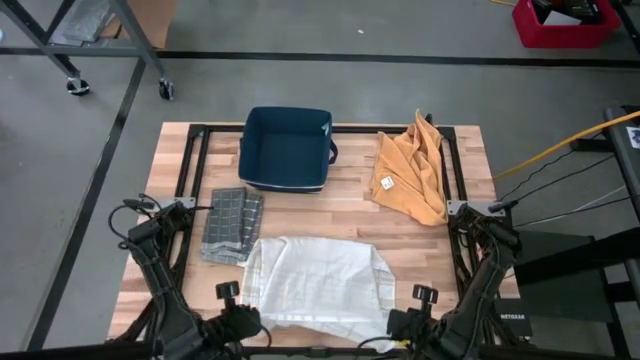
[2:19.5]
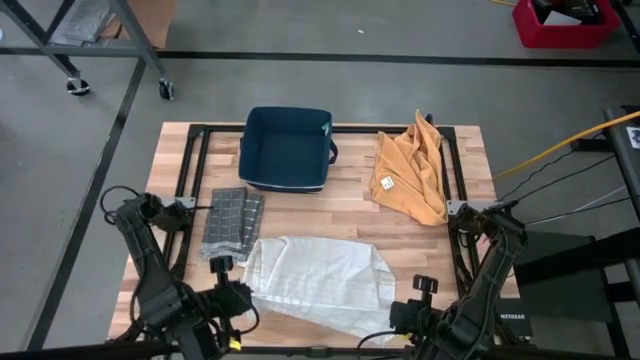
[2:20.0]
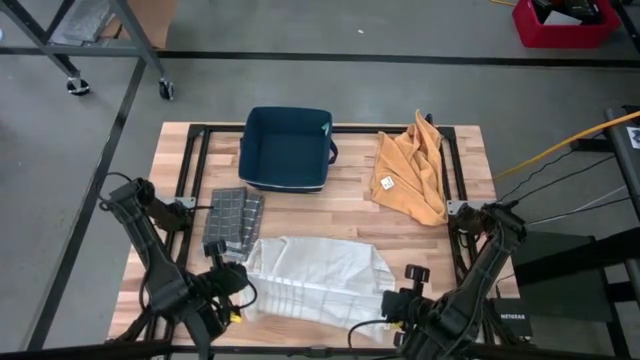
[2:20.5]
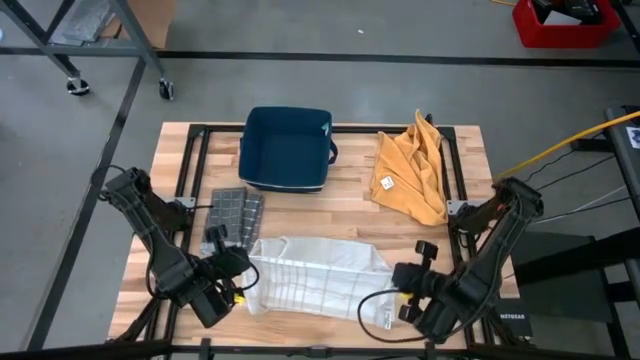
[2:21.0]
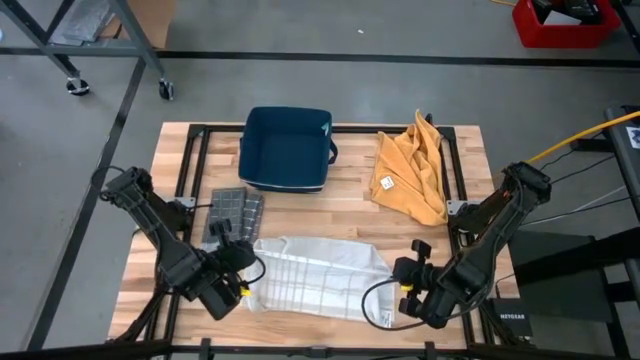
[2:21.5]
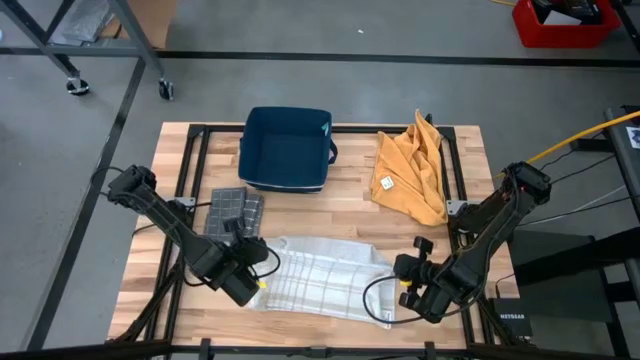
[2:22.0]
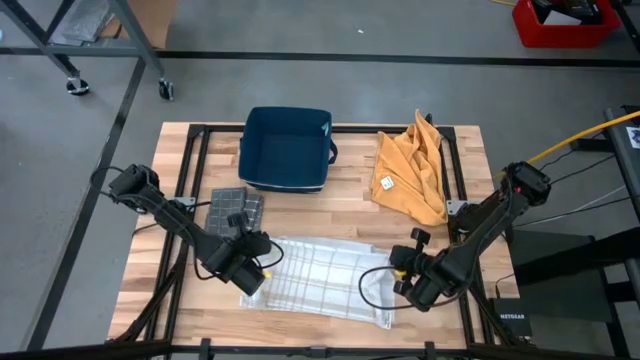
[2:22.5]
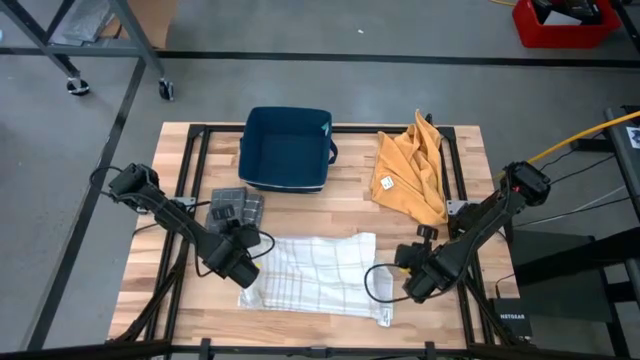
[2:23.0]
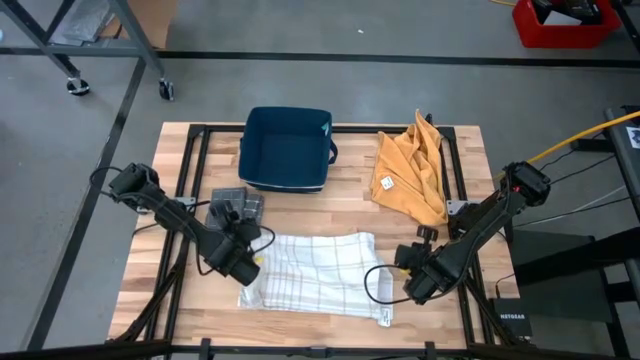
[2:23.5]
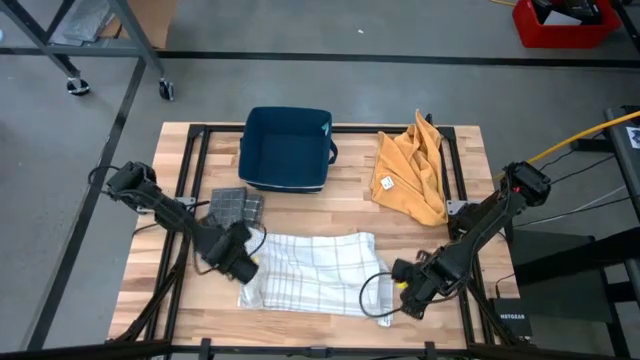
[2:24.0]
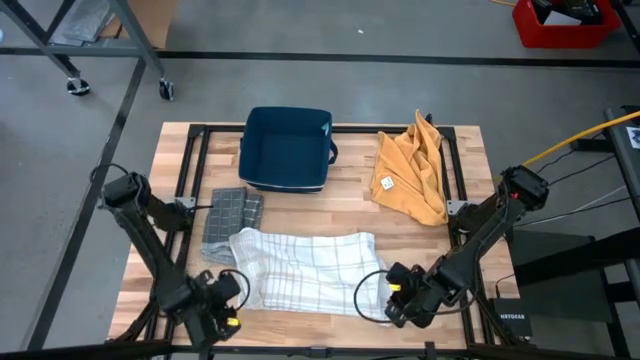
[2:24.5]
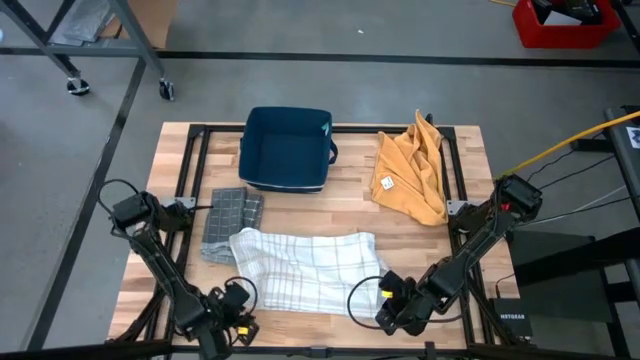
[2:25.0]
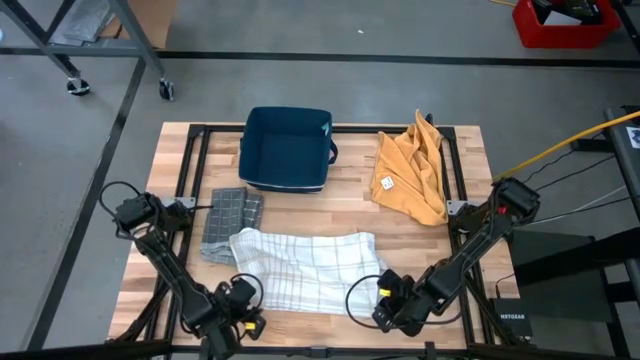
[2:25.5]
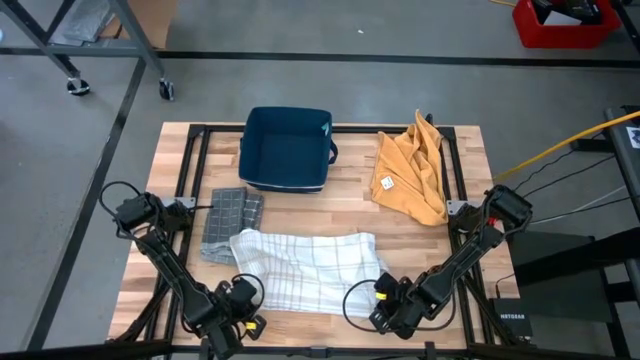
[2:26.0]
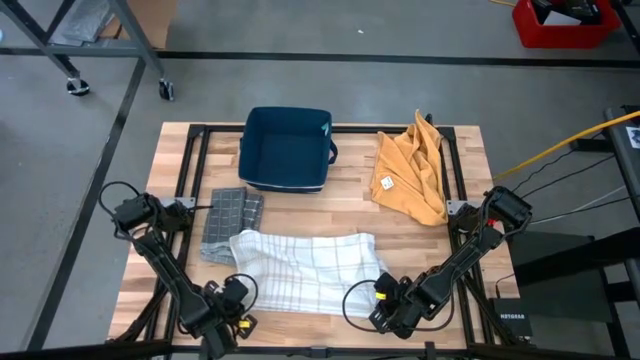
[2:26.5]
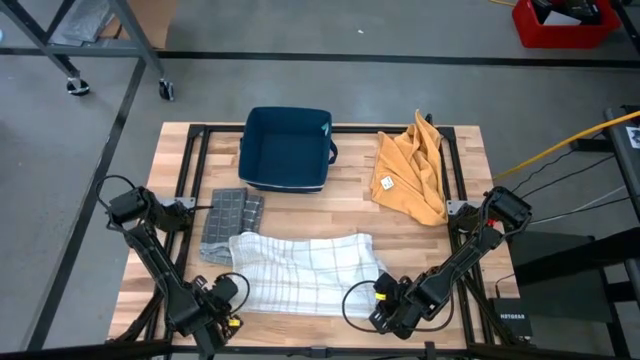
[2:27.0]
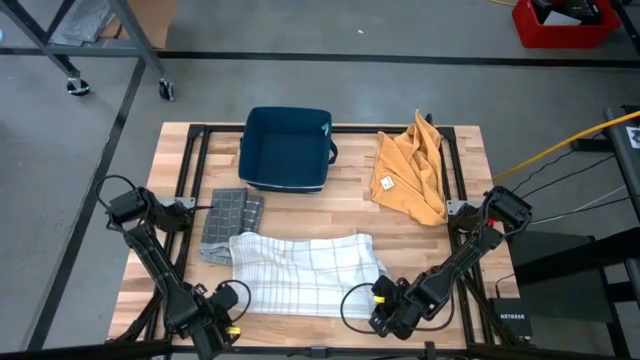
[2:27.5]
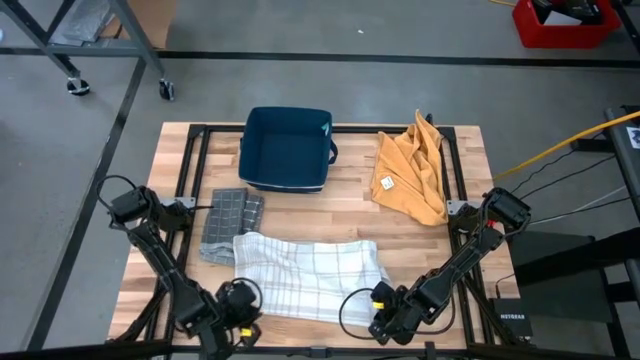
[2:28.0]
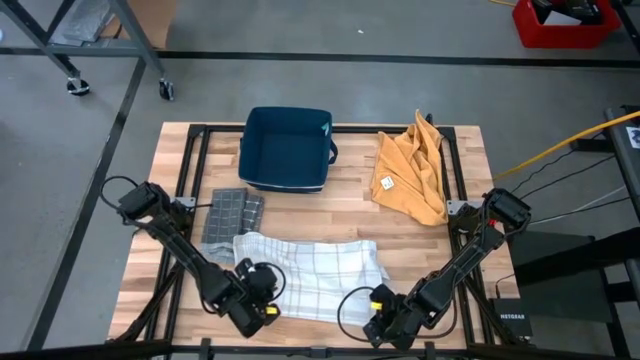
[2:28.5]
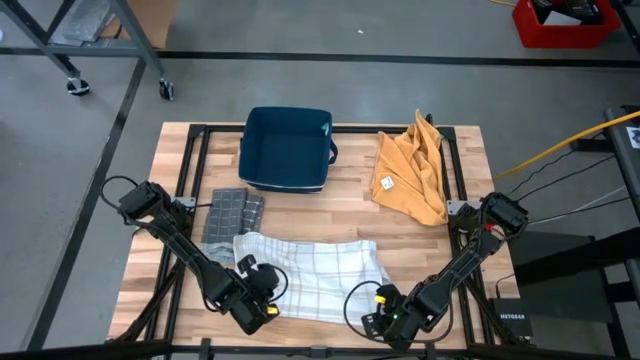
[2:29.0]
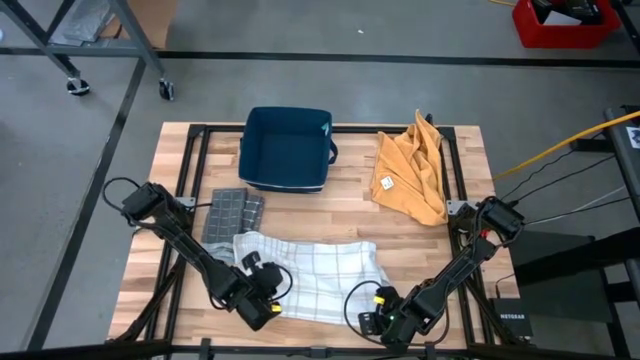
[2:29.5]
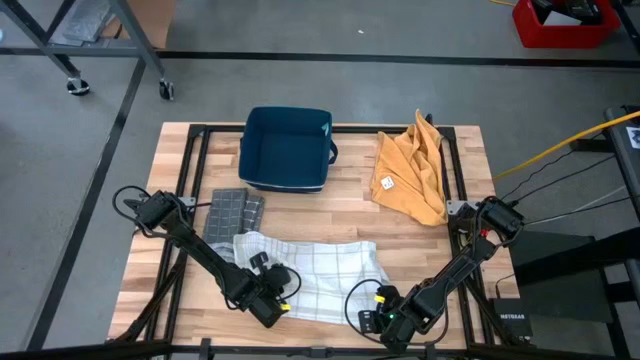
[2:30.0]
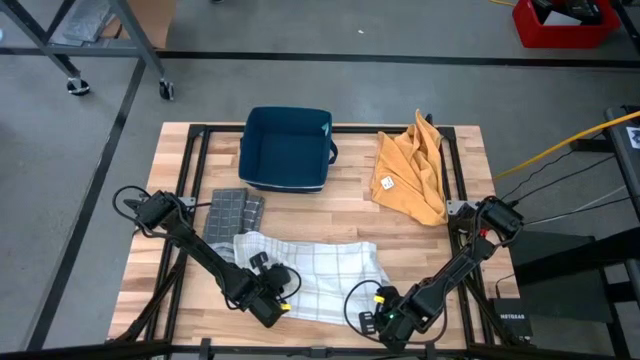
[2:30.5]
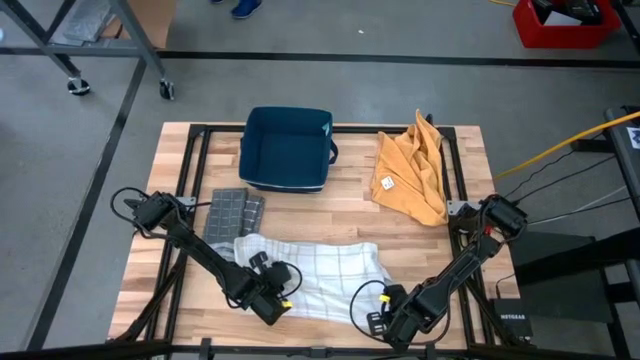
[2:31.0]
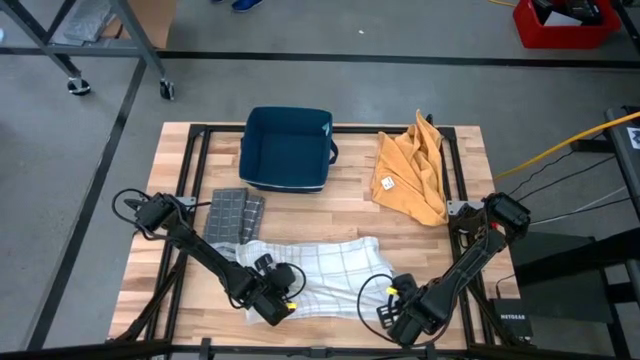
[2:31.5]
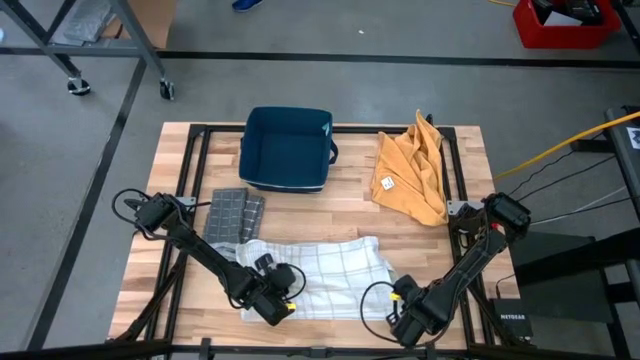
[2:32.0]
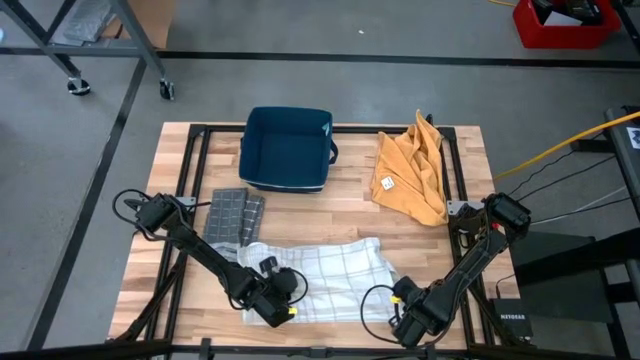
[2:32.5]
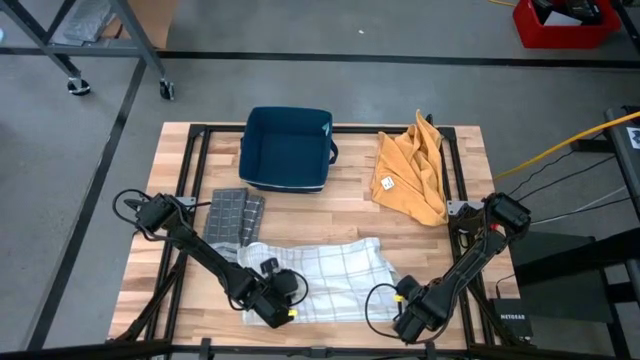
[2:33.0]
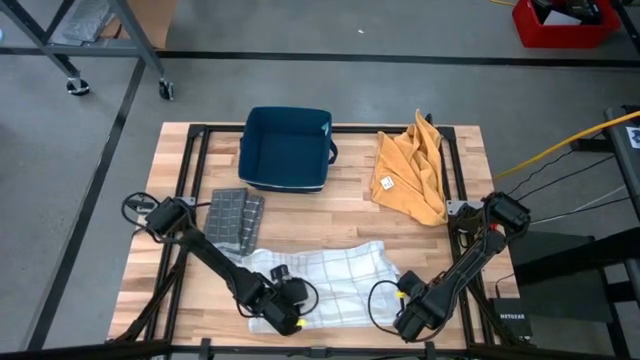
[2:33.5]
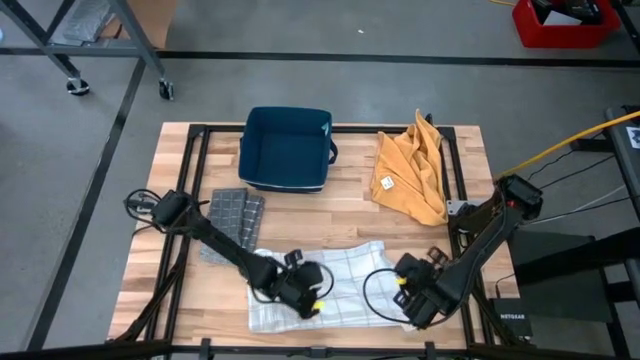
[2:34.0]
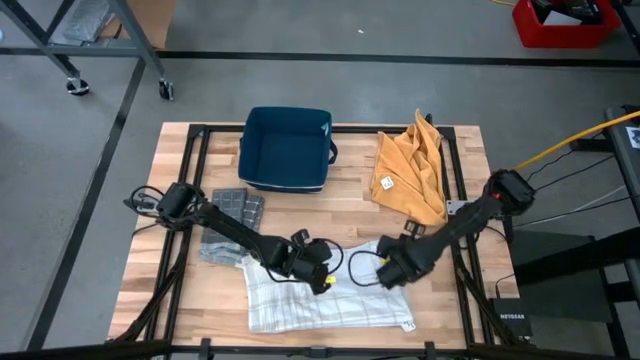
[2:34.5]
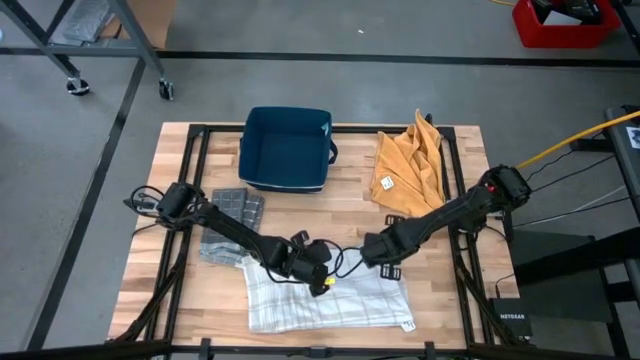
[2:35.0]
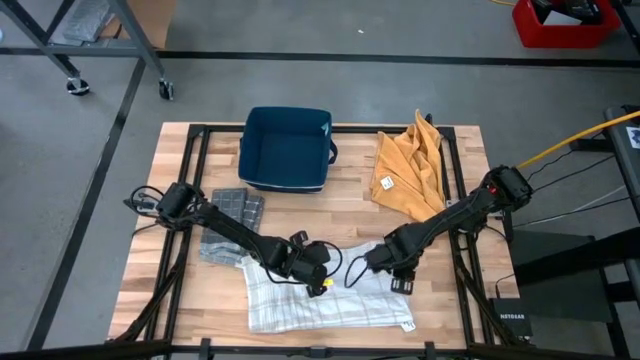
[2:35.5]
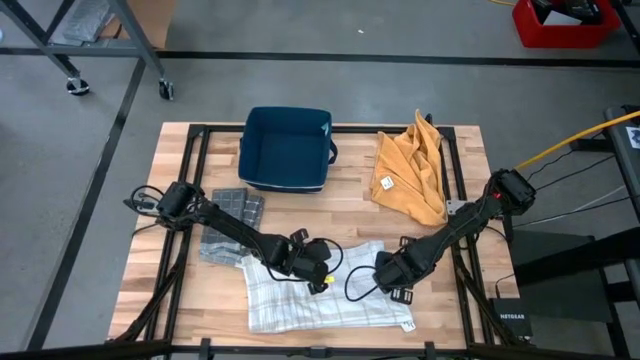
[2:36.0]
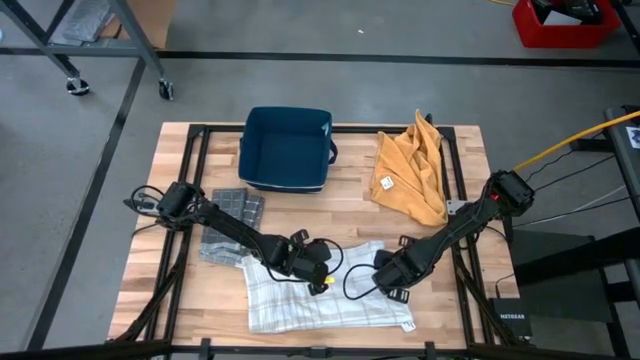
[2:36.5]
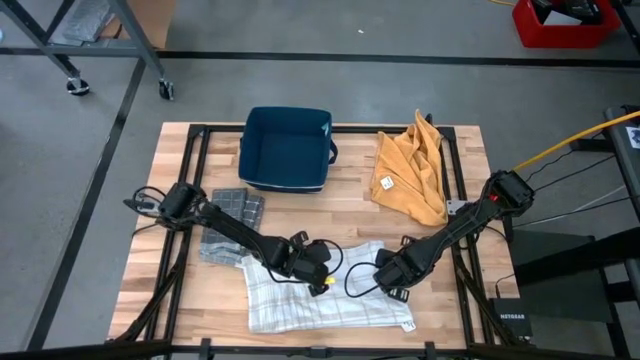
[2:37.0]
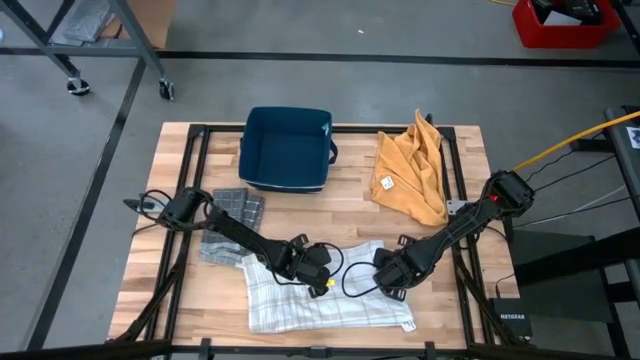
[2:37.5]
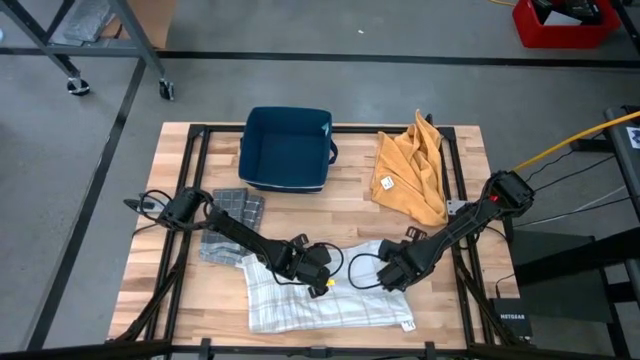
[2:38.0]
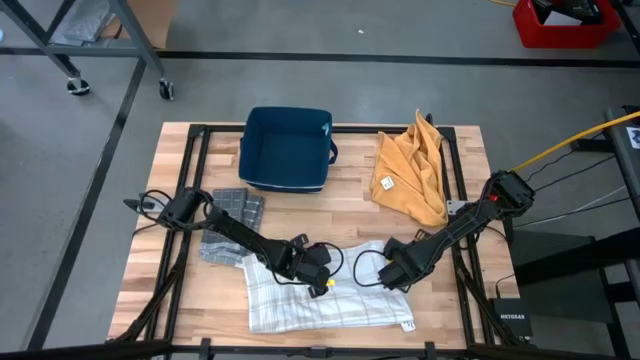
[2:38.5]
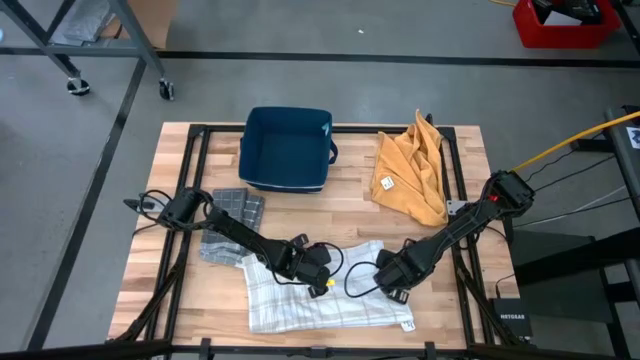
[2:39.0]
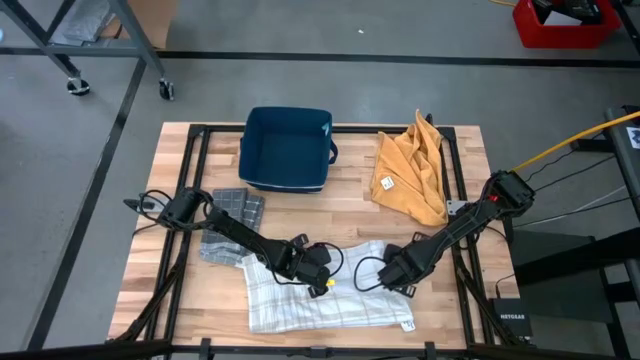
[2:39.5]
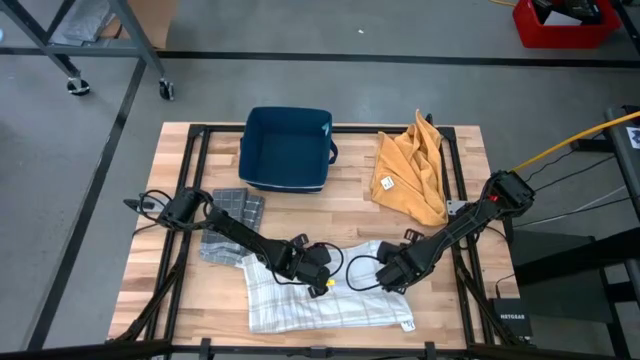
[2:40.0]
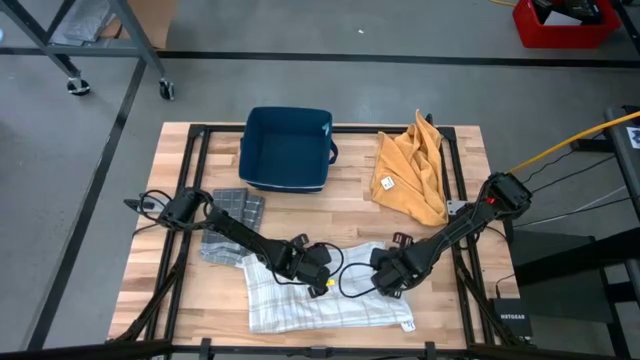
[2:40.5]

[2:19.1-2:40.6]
Task: Fold towel
Fold the white patterned towel
